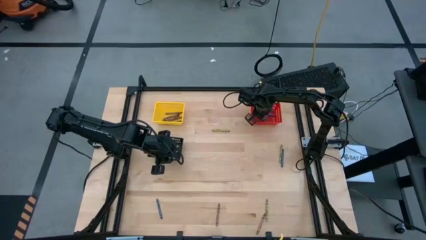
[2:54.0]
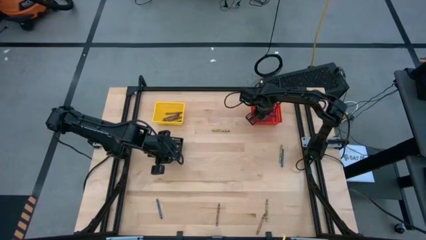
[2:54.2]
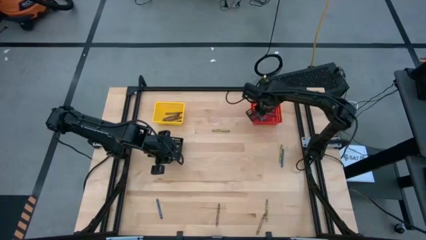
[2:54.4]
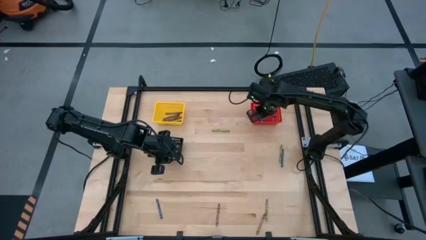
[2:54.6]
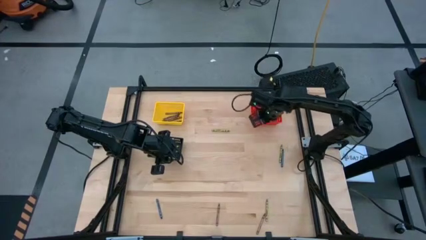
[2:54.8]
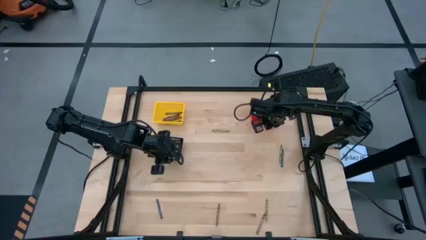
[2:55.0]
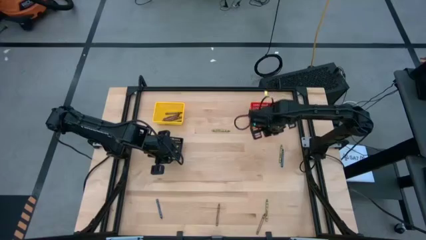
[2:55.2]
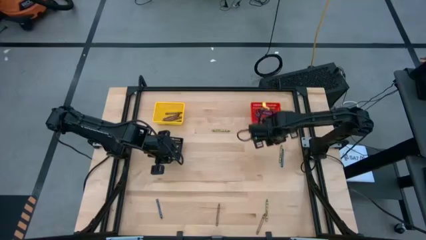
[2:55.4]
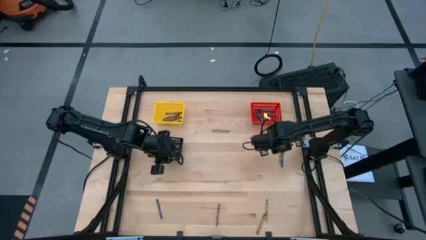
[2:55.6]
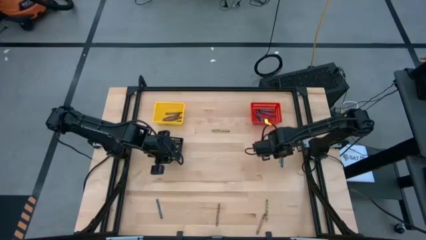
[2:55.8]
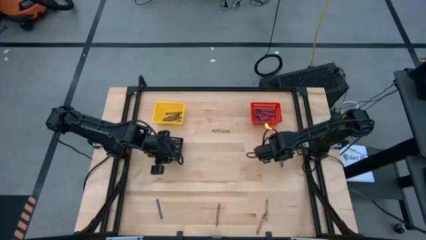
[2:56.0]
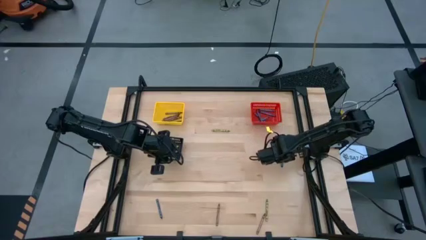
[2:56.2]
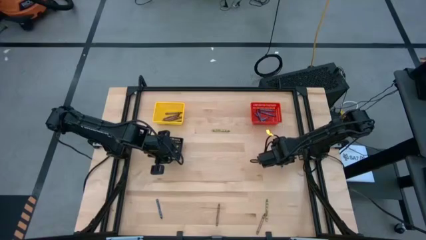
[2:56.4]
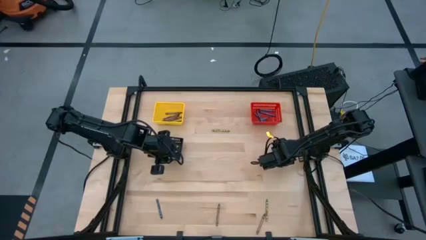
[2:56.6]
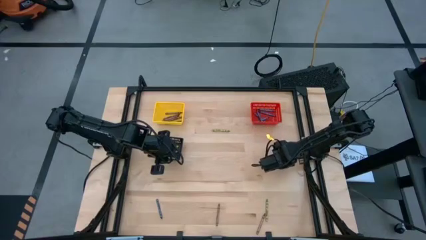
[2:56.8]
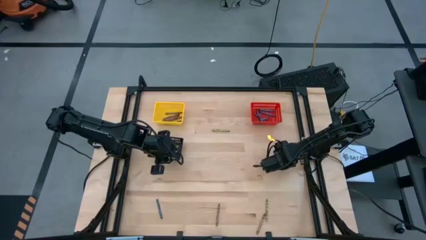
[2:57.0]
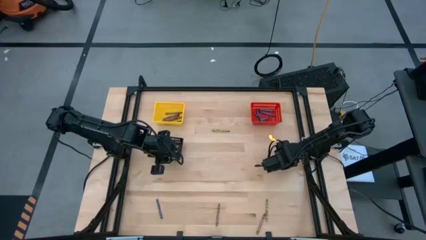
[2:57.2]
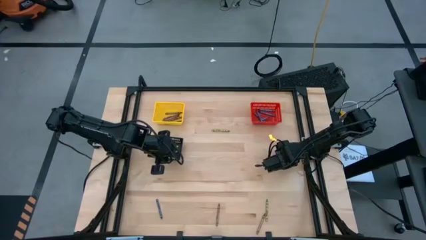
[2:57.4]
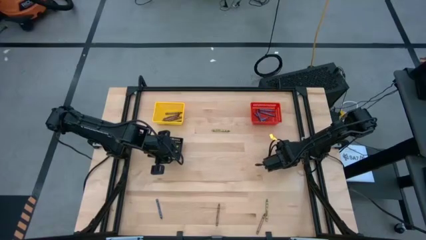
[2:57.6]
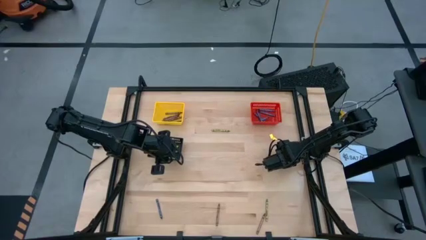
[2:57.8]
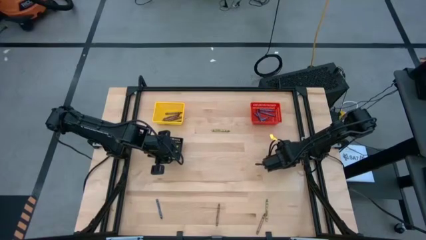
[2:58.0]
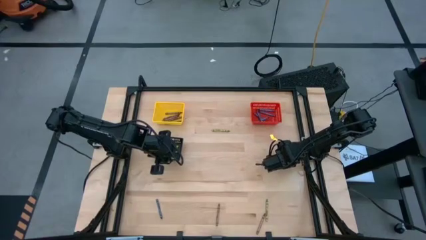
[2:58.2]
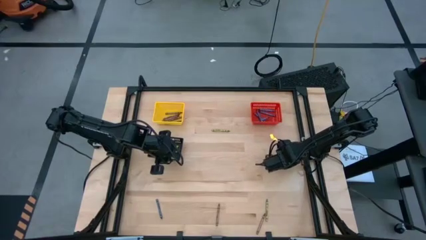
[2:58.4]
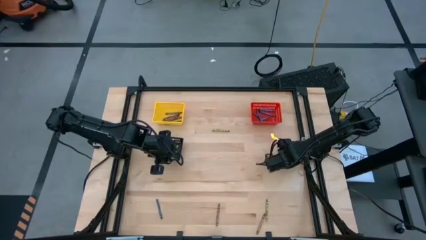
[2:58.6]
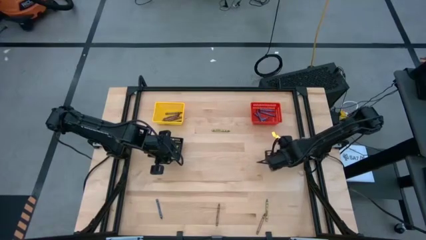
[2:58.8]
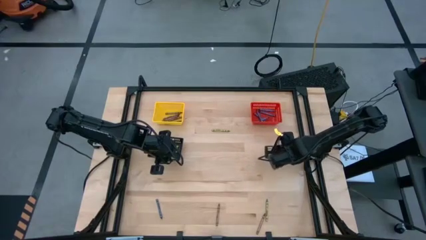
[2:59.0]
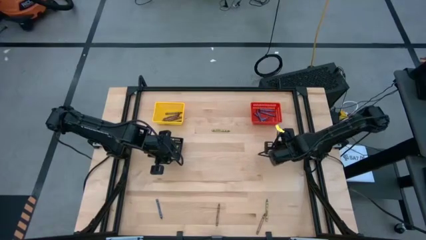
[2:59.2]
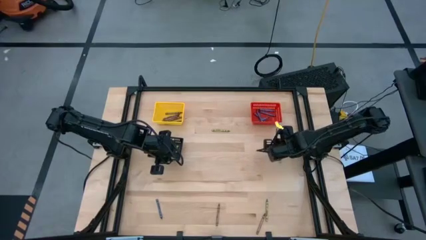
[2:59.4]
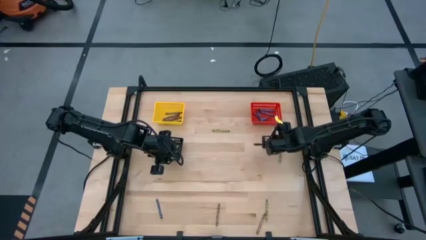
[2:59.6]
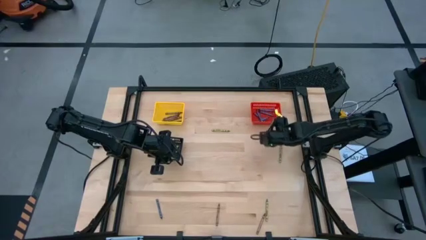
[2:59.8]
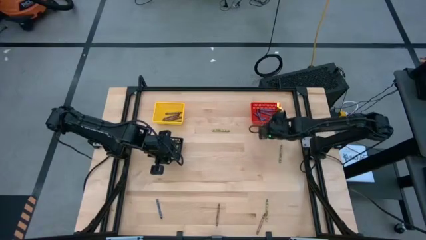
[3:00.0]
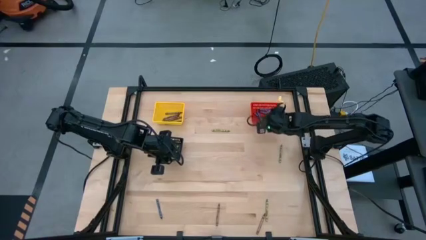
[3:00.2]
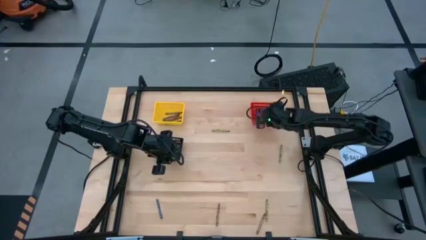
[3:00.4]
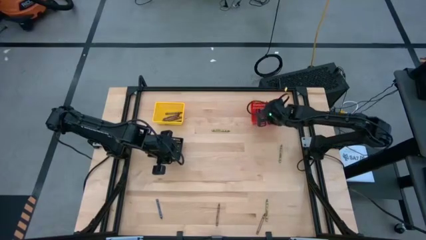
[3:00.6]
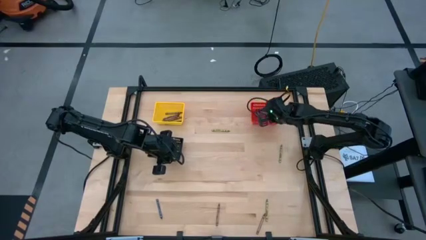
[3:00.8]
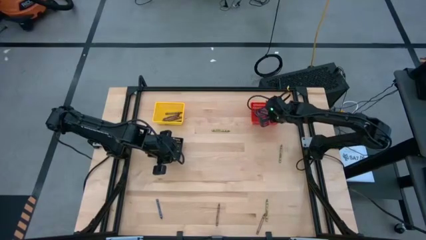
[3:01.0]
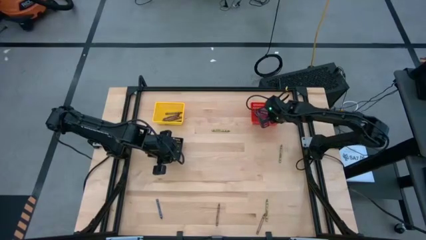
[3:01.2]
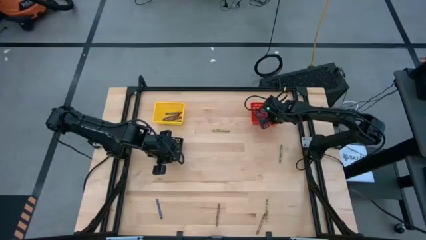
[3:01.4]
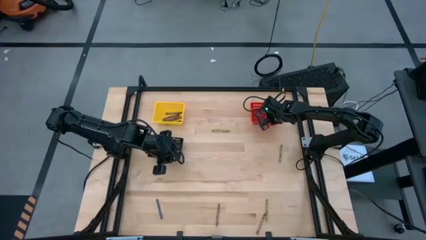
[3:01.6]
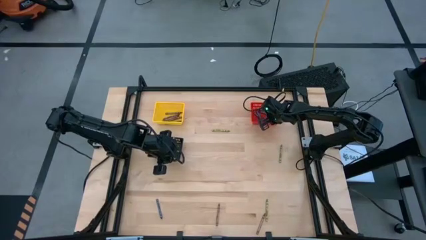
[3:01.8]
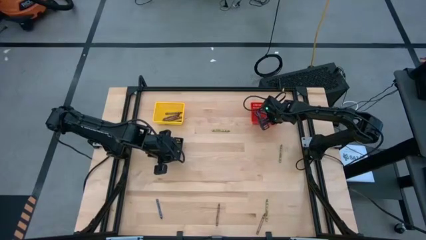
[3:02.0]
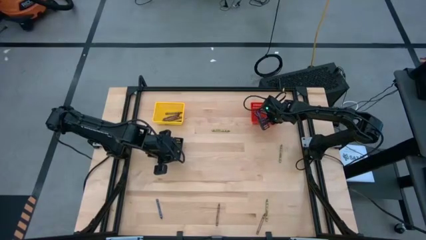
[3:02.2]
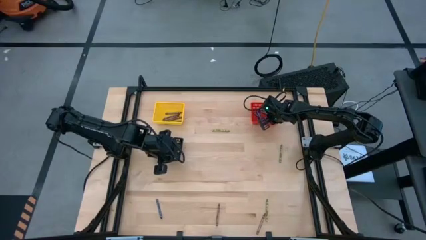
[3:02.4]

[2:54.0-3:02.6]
Task: Sort crayons
Put the blue crayon into the red bin

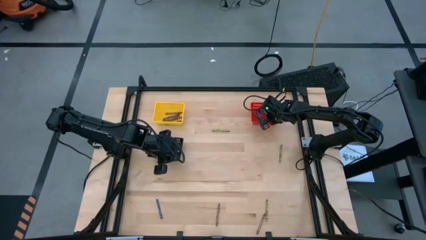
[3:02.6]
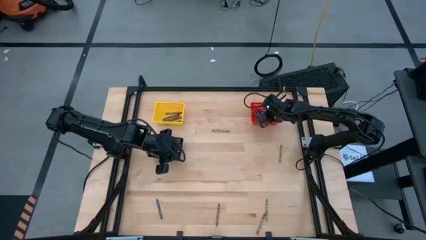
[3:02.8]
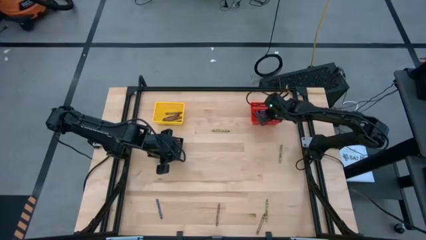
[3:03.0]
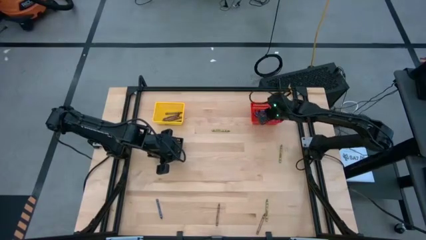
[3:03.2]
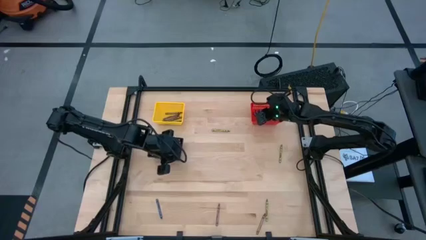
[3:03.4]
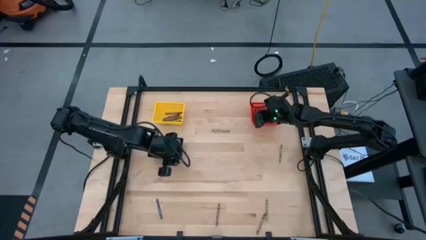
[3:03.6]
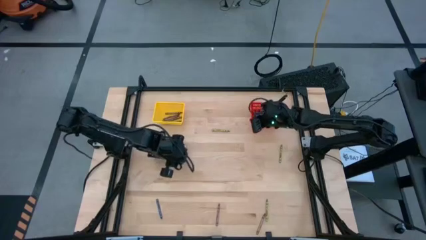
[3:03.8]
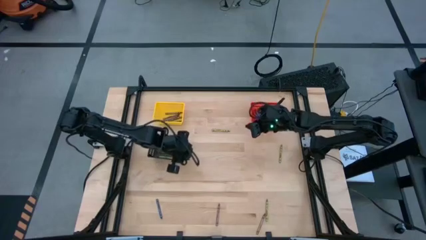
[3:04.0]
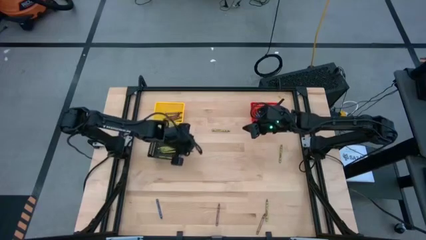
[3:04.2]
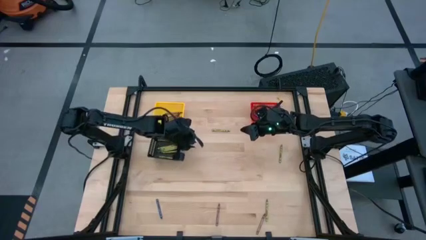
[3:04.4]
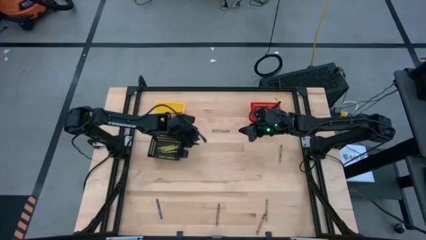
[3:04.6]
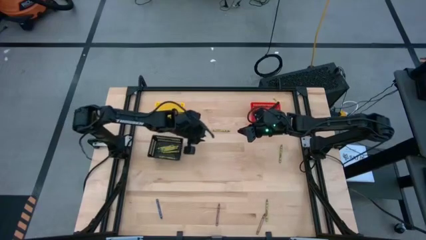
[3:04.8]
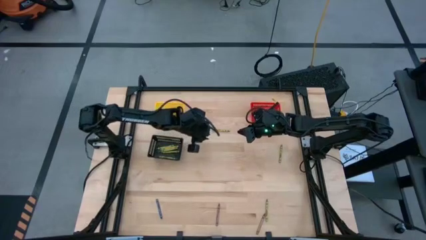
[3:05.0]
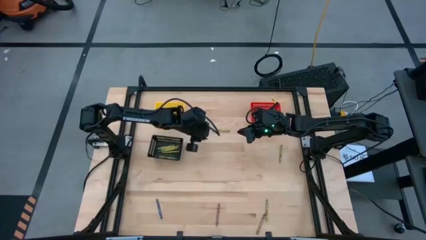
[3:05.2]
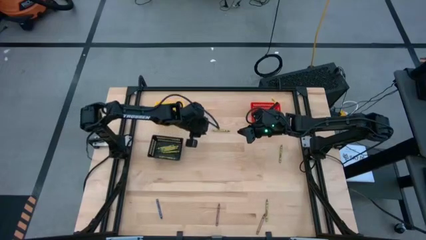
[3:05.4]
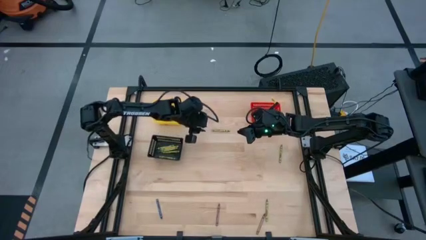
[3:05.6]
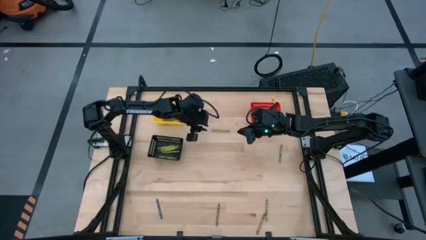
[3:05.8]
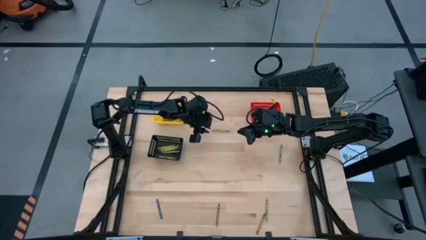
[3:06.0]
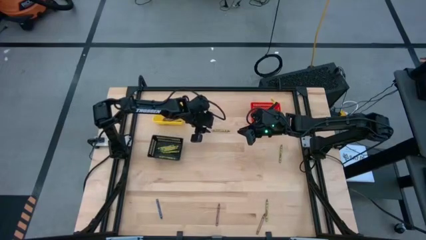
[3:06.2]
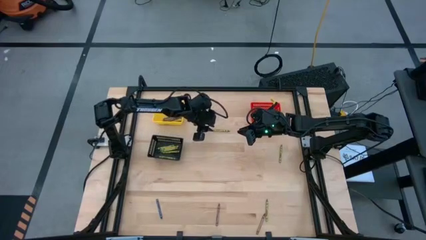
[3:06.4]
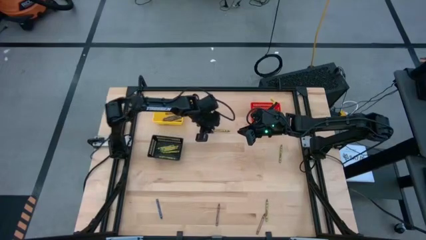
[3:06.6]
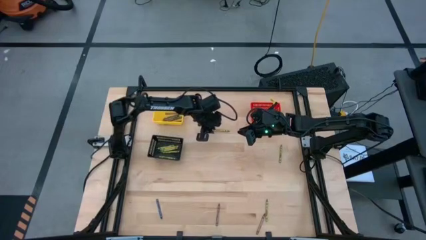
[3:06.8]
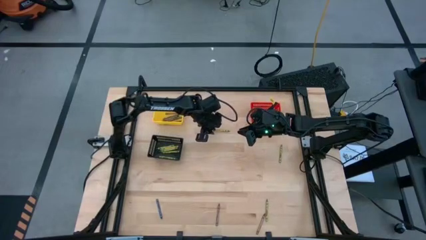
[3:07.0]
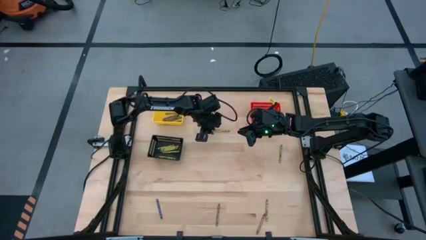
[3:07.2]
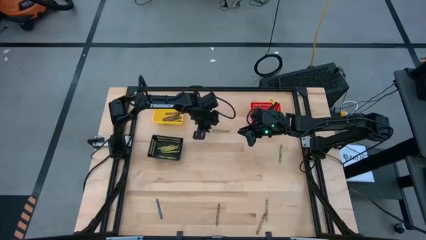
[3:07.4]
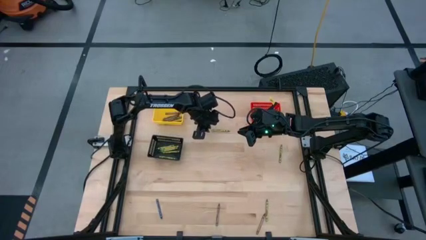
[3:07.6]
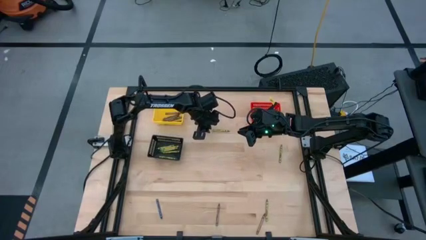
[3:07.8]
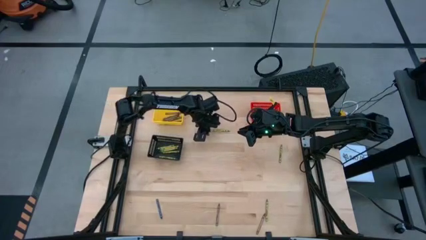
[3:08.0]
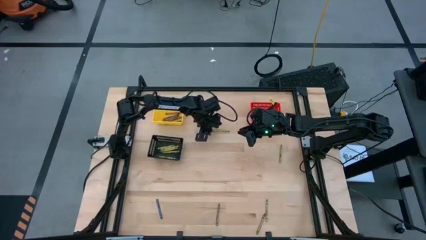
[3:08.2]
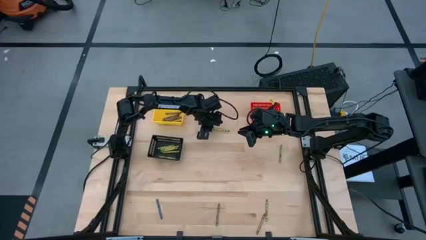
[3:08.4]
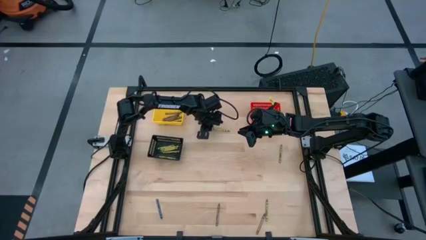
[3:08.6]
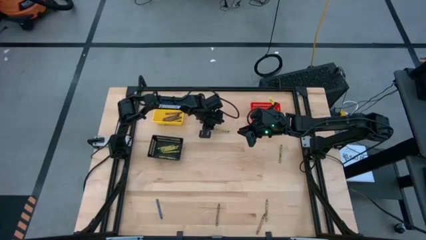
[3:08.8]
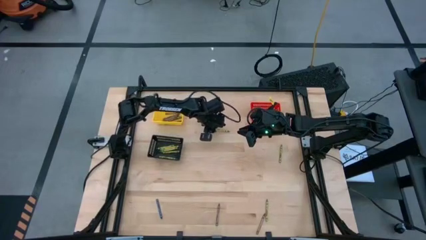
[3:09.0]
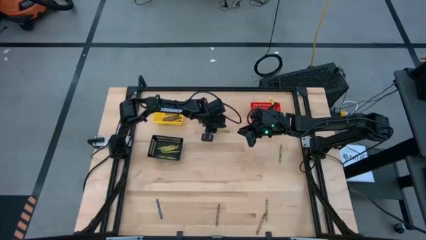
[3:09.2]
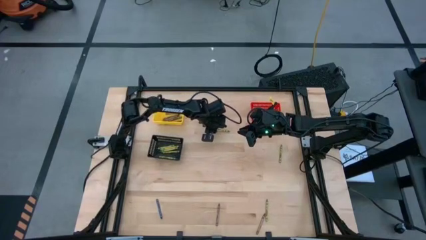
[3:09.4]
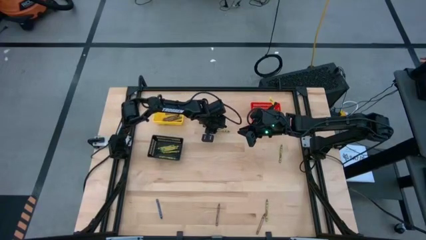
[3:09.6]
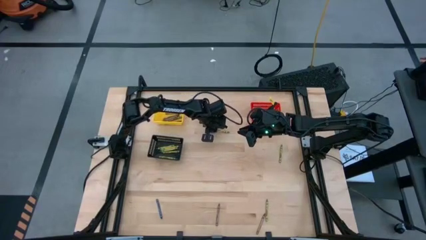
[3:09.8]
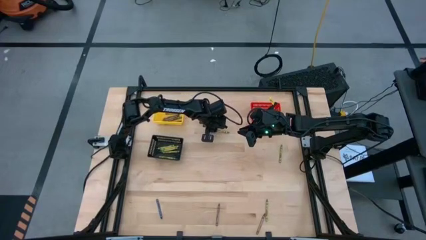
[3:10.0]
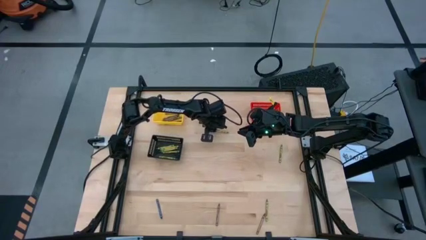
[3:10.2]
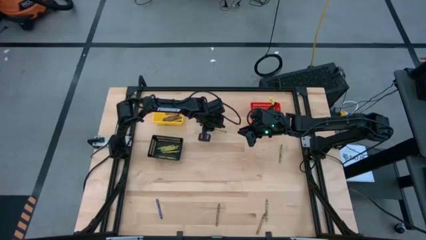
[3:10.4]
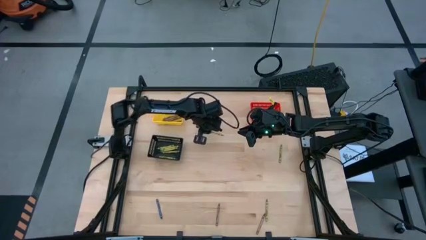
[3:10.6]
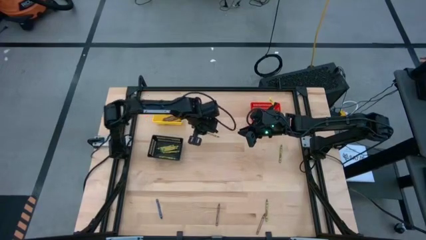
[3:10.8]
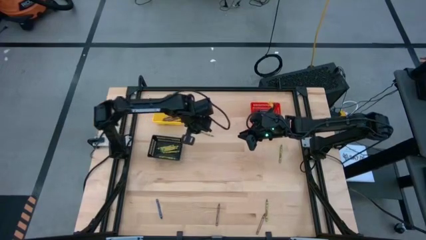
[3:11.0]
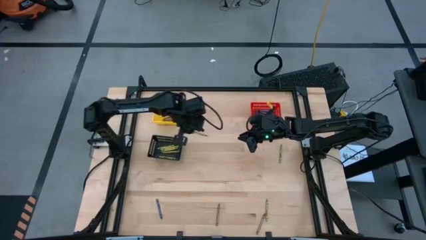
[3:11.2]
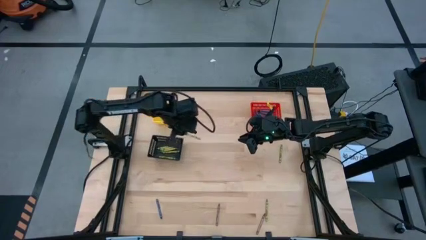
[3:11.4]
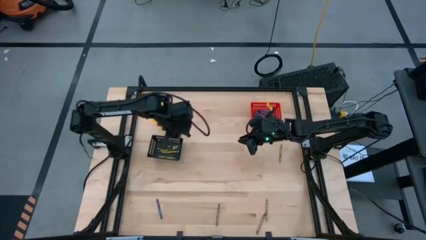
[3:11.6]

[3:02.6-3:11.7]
Put the green crayon into the black bin
